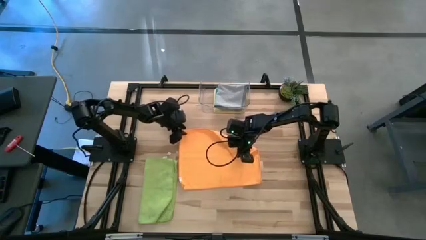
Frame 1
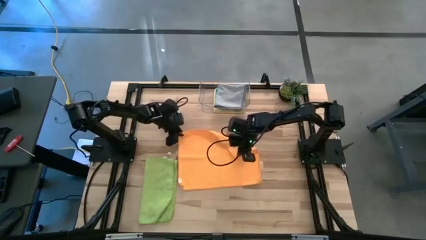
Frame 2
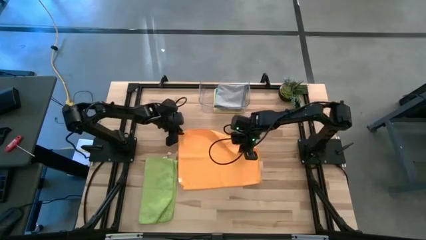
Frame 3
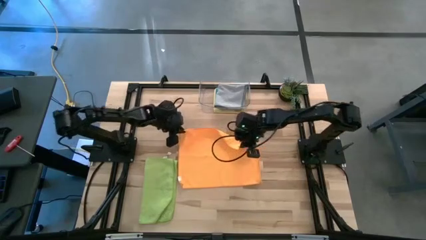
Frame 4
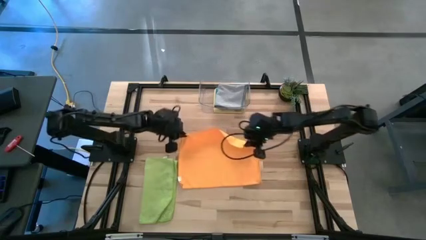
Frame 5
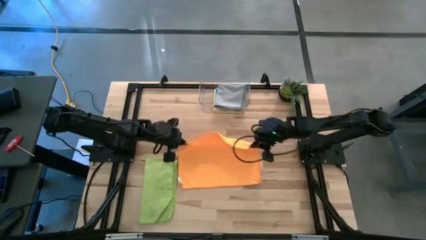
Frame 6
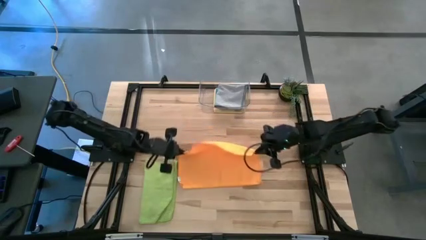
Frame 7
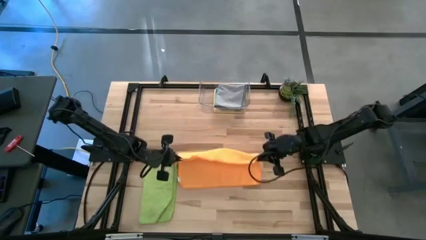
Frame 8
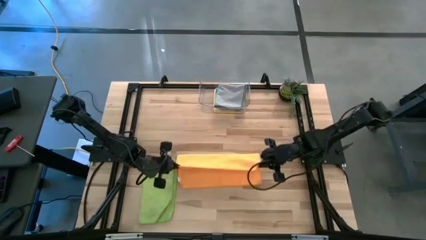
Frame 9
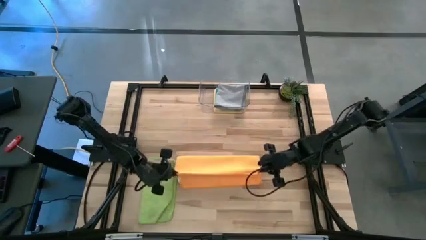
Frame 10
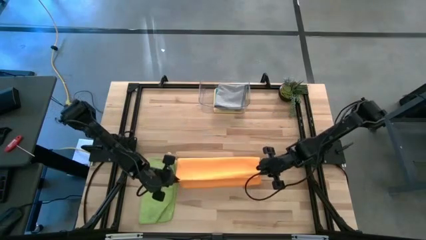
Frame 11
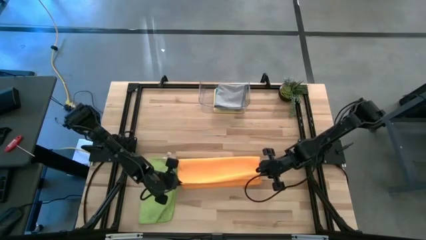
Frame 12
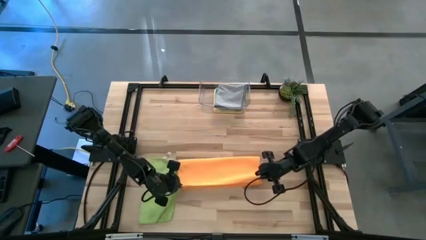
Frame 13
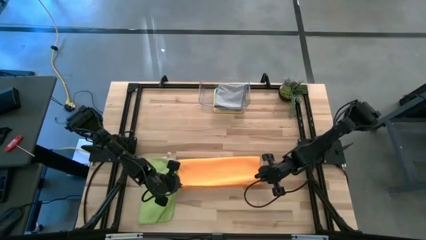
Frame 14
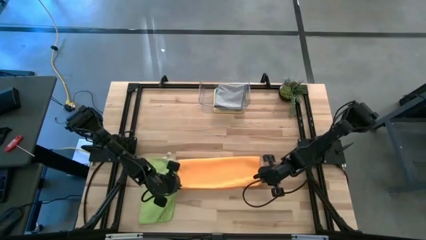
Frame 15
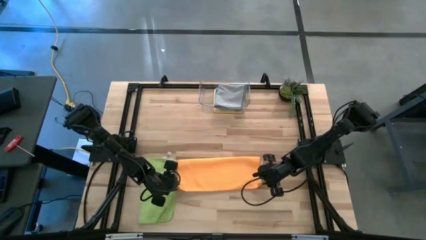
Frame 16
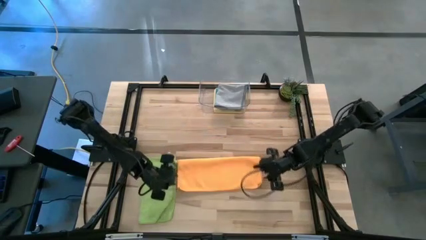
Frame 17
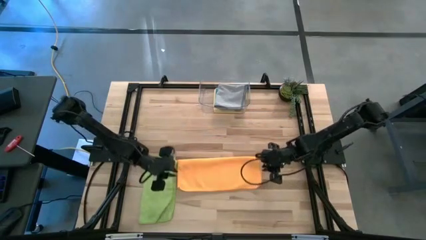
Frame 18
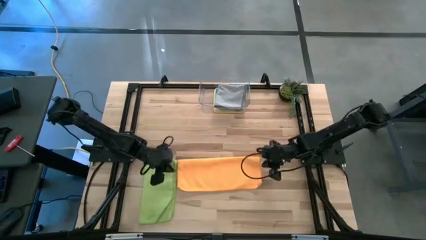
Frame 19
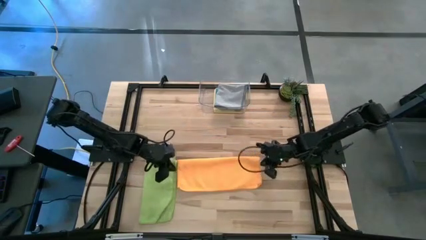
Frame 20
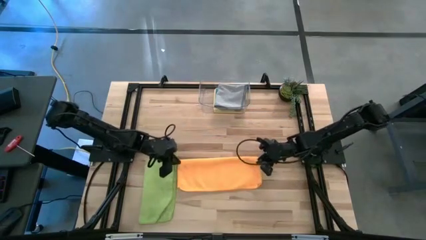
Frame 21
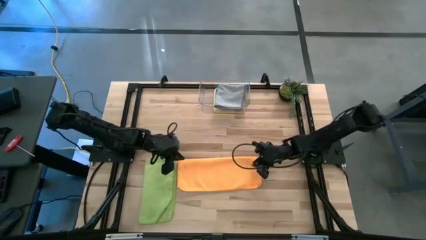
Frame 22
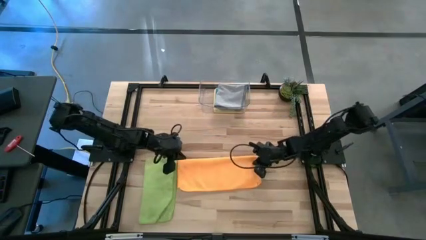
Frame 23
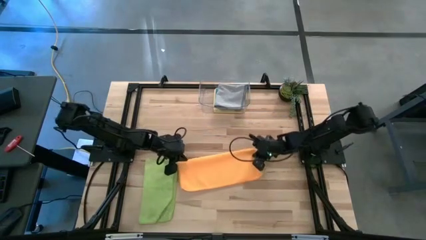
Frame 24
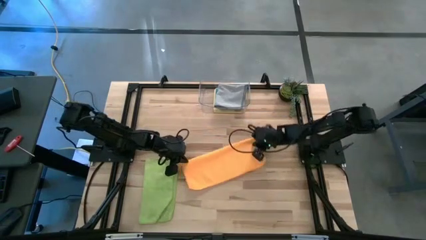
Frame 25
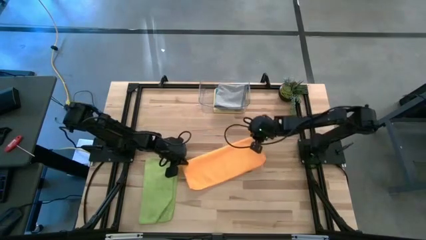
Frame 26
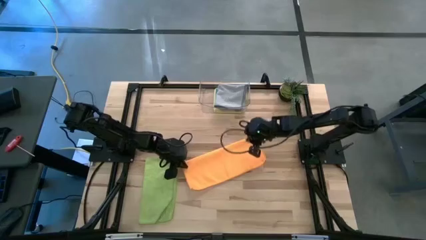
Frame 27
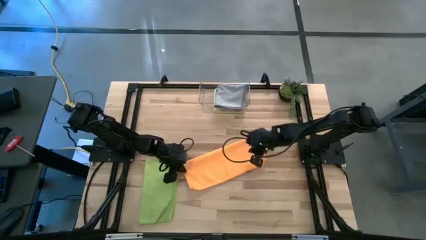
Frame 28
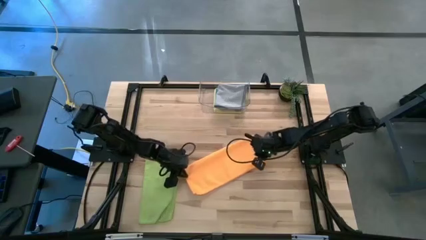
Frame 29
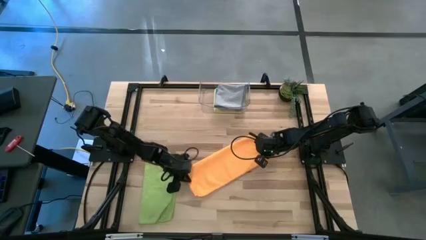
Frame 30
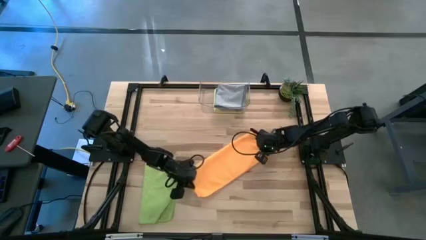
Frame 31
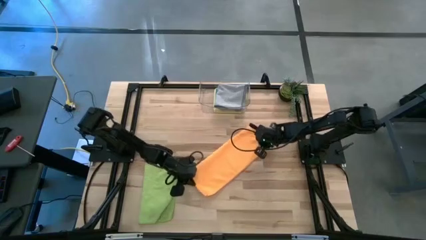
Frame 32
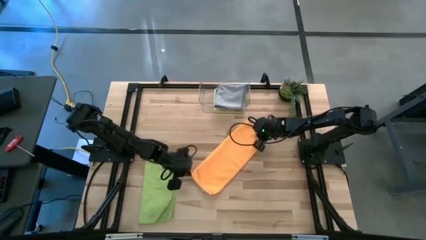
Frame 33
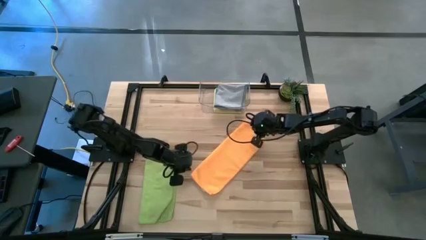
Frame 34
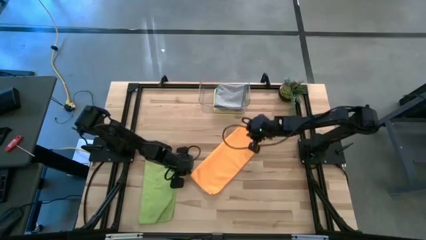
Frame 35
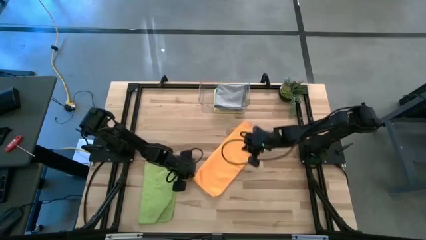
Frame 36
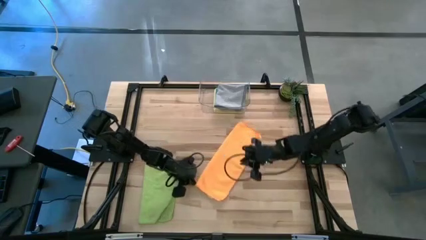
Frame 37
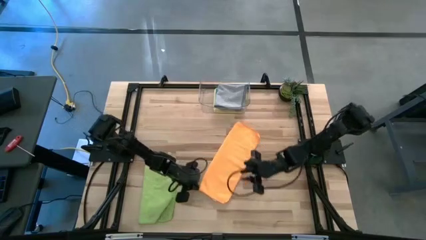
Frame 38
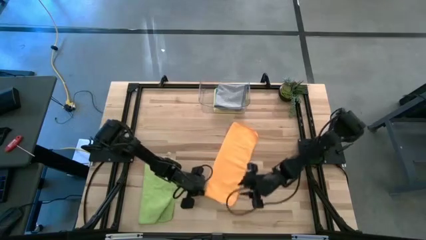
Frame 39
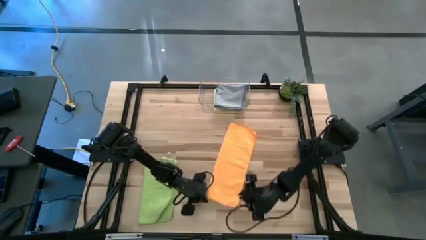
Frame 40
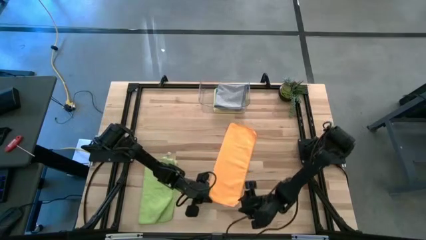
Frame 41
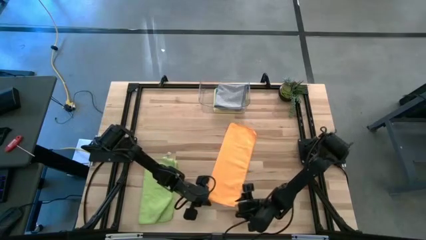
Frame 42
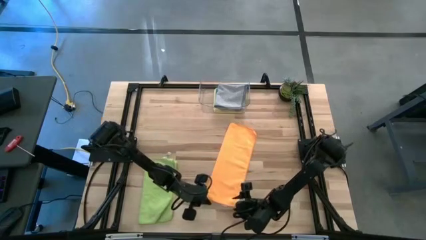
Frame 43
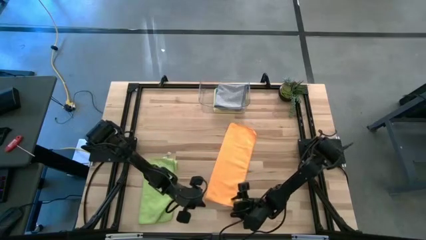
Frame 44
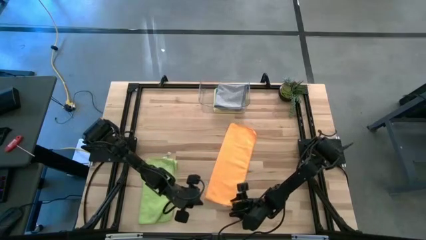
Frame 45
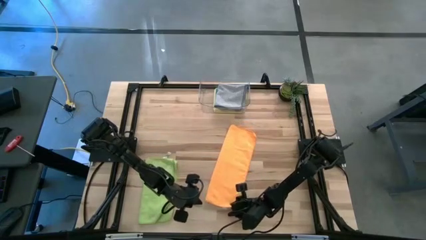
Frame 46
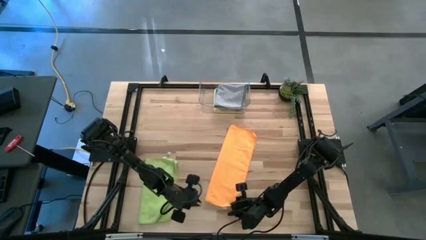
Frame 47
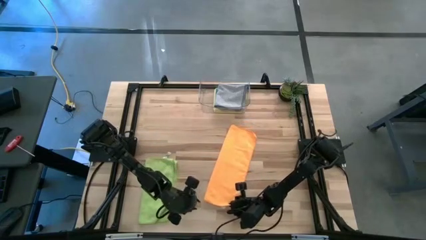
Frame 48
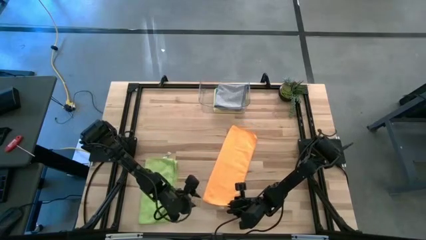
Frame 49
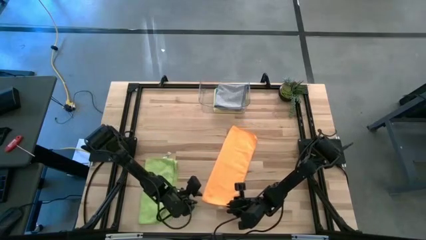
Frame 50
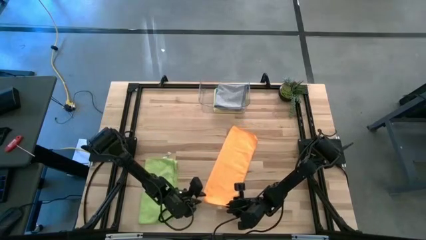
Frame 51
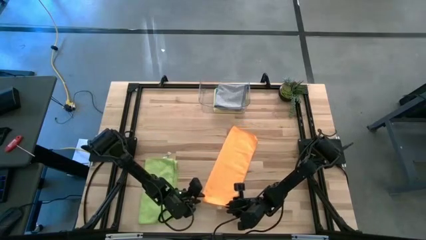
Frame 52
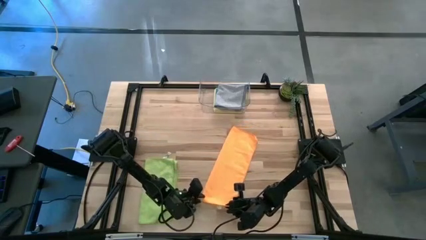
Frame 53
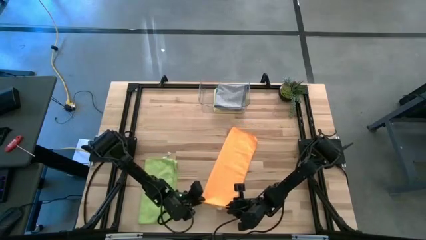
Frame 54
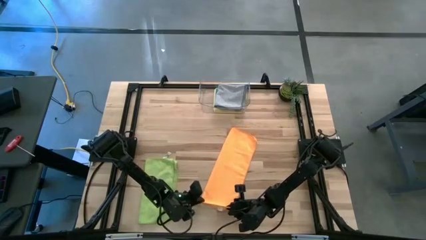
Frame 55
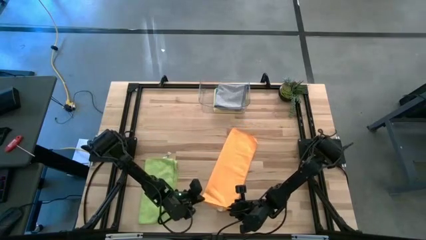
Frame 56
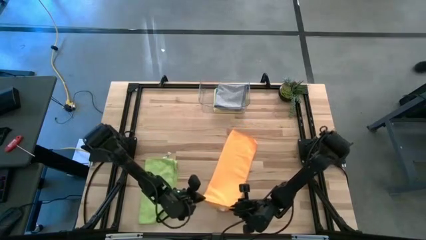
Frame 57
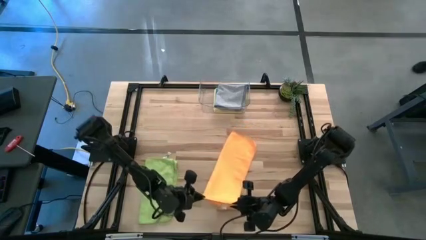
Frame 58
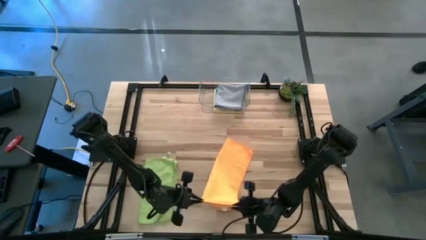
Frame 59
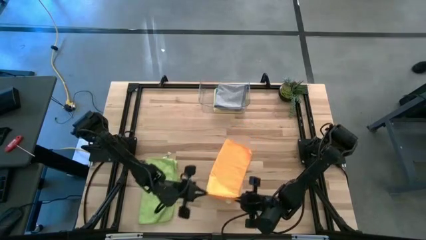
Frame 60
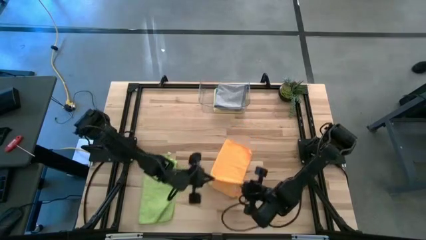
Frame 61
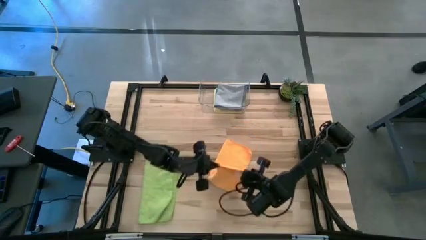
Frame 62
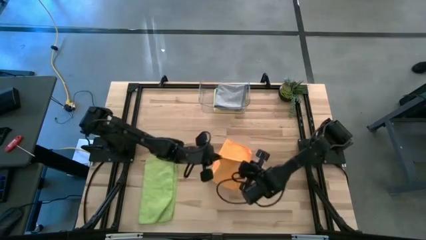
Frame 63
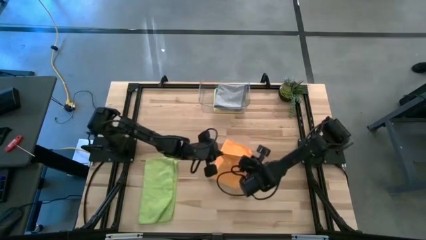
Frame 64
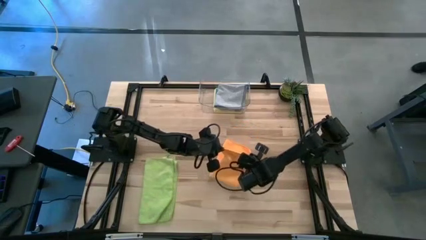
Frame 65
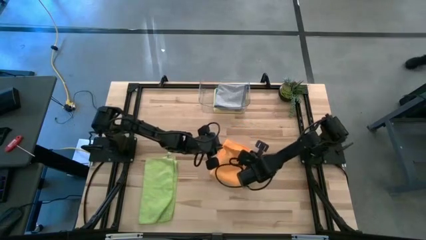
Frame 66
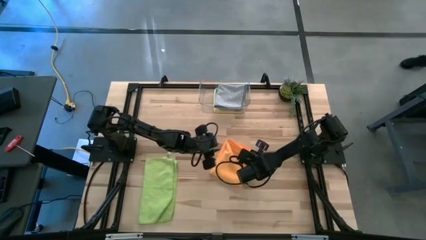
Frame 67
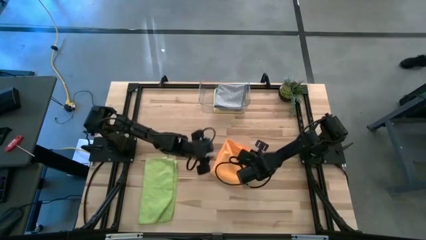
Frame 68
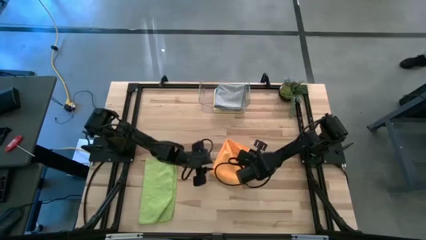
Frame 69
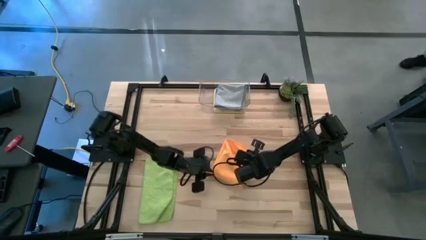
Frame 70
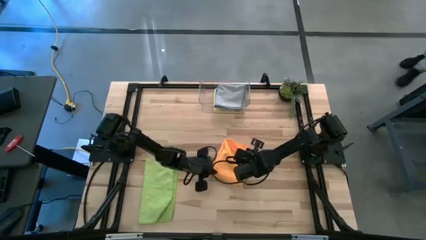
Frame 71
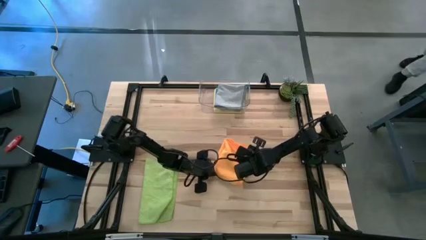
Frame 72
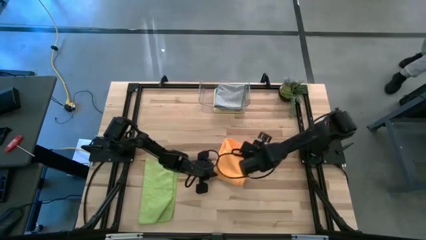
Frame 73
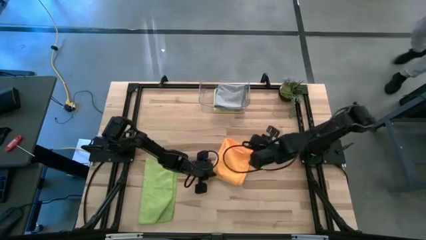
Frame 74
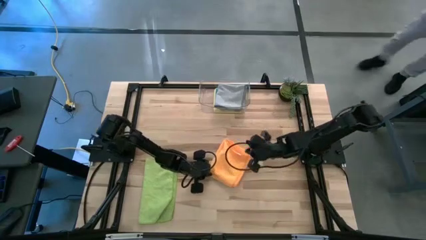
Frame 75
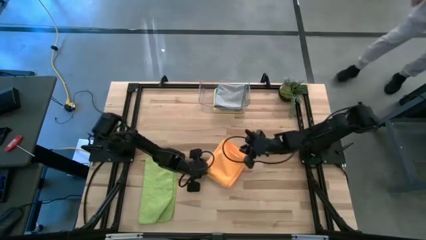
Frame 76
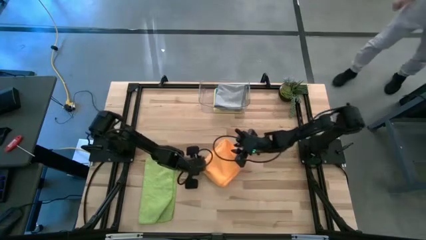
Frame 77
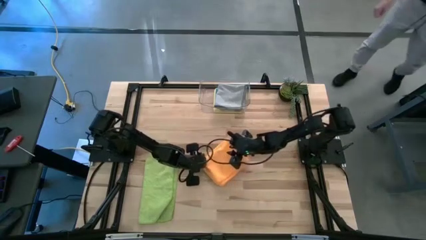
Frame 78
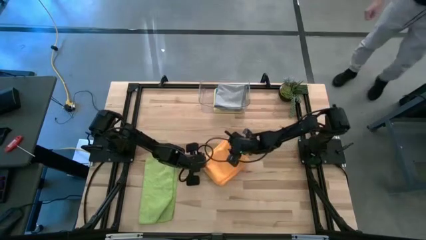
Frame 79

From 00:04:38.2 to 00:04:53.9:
Task: Fold microfiber towels
Fold the orange towel on the table
